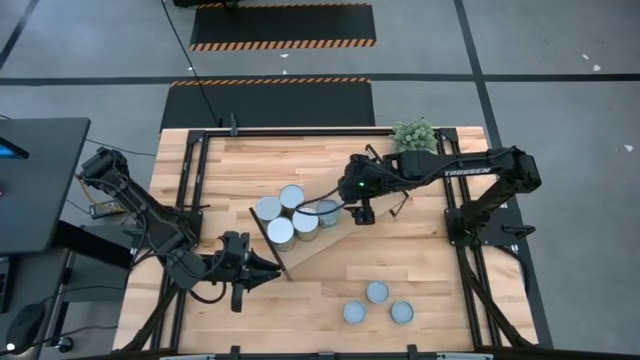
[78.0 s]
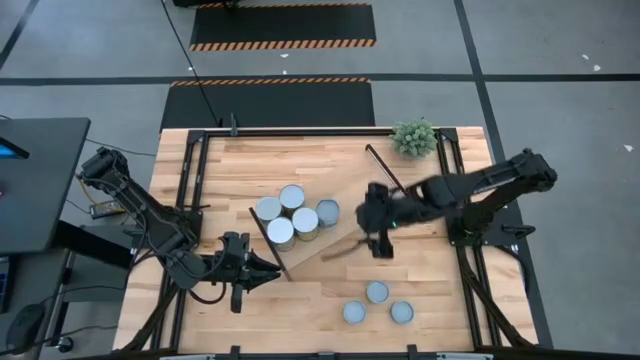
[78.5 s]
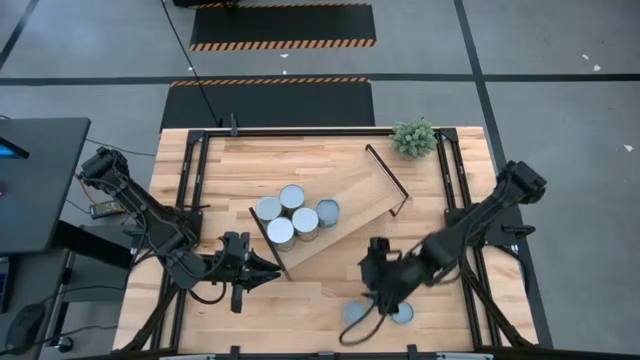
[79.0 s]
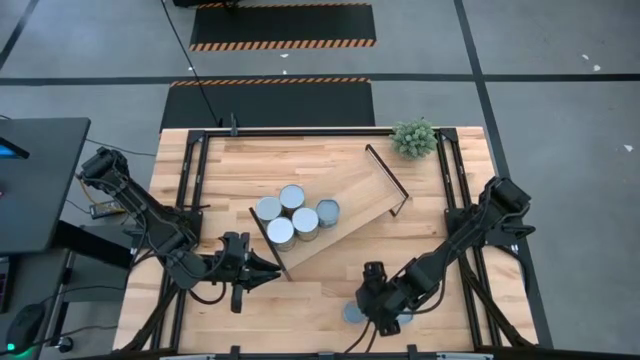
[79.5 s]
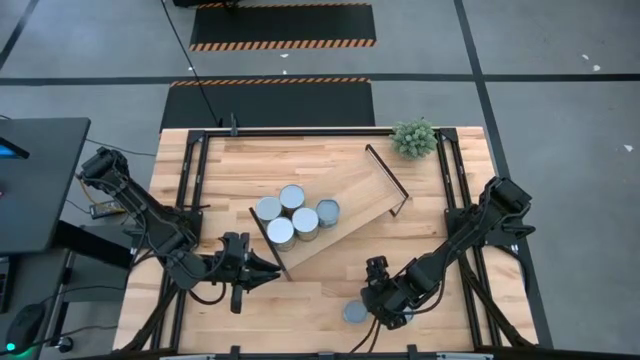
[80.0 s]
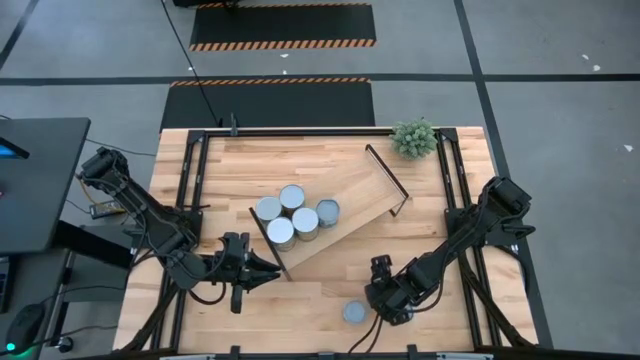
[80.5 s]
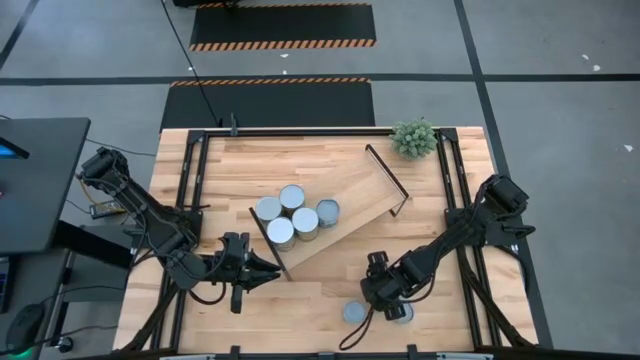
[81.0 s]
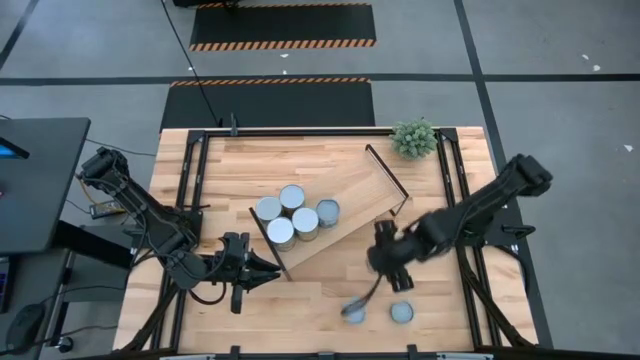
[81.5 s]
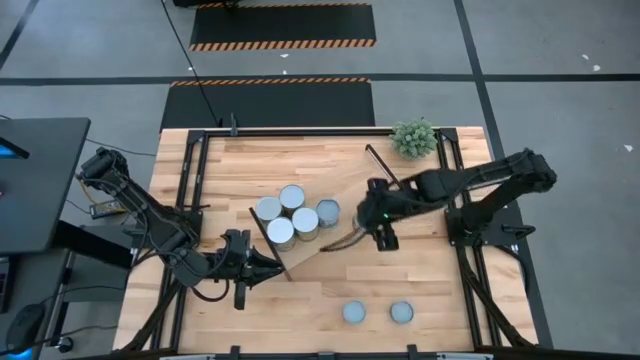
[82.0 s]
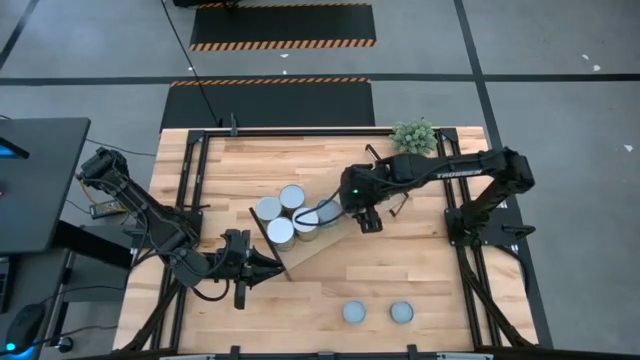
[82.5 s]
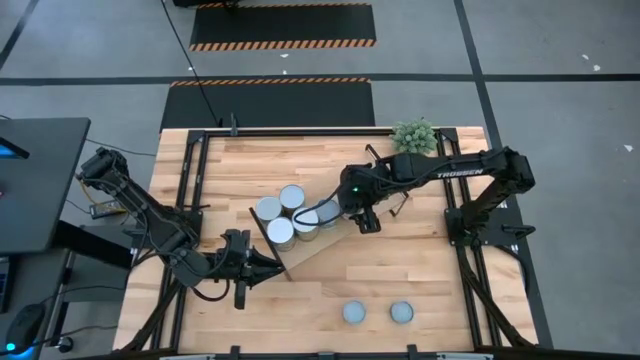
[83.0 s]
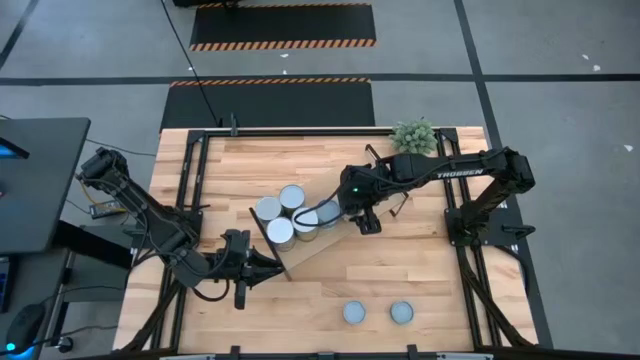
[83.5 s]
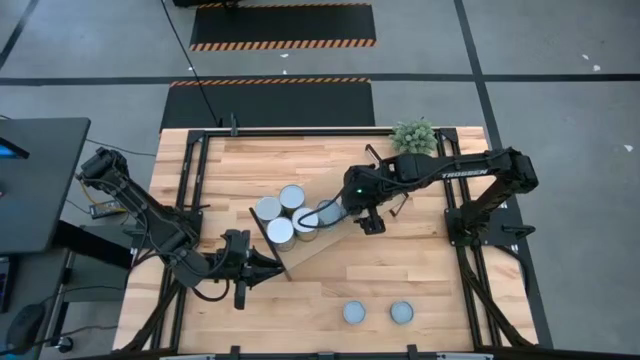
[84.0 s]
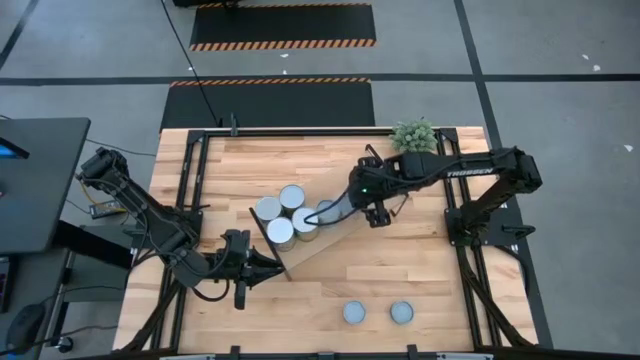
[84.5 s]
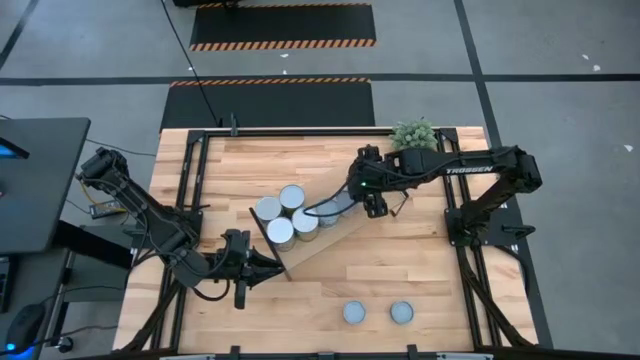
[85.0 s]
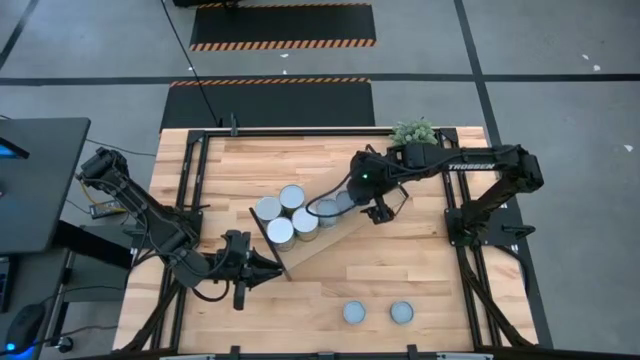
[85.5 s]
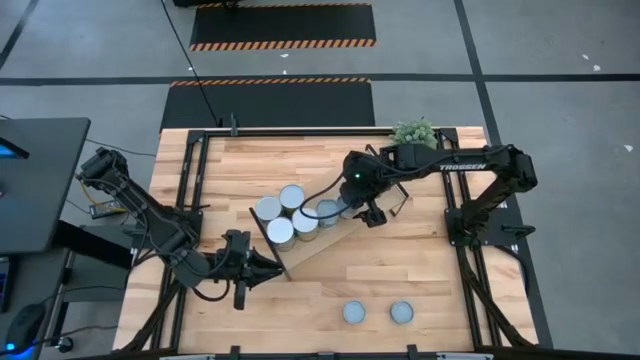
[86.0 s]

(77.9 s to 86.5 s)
Task: Pick and place cans onto a shelf
Put the canned green peas on the shelf

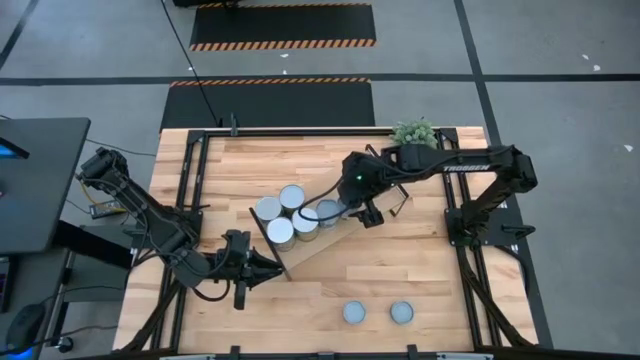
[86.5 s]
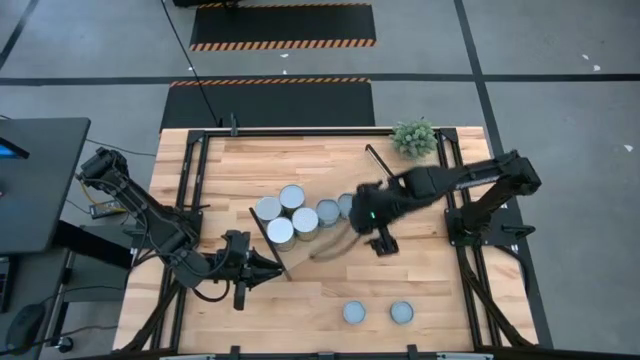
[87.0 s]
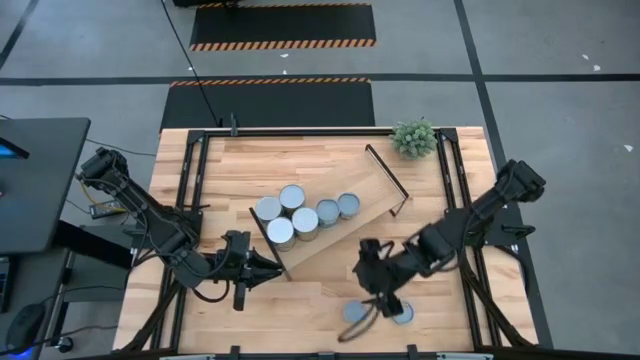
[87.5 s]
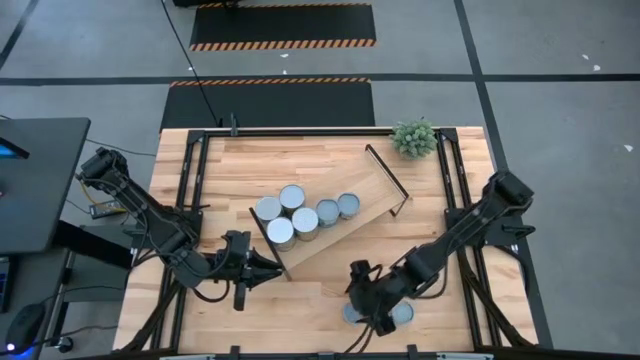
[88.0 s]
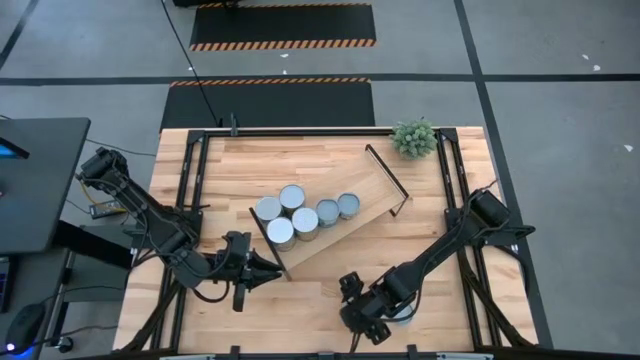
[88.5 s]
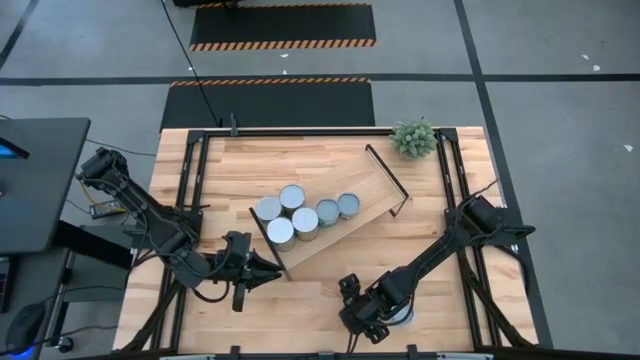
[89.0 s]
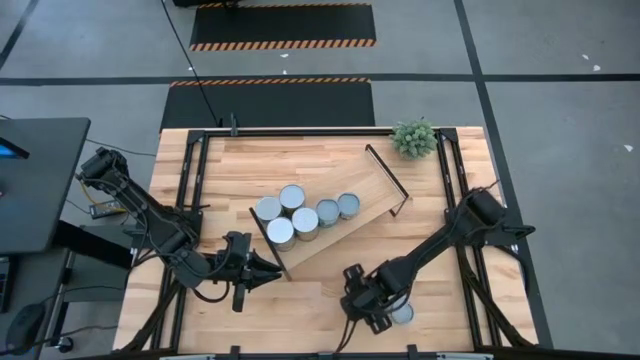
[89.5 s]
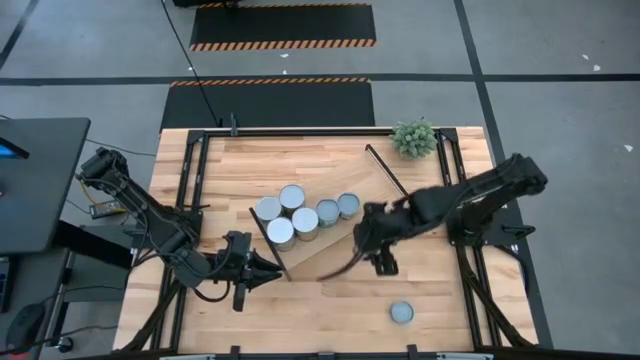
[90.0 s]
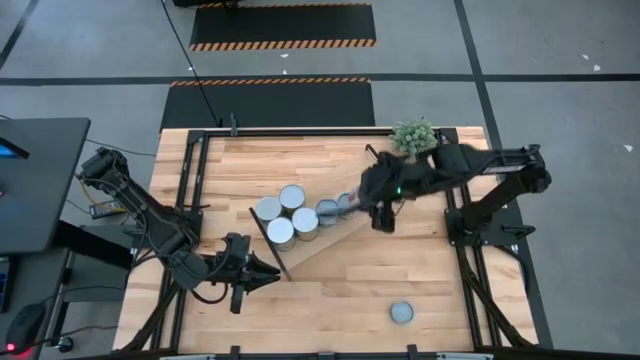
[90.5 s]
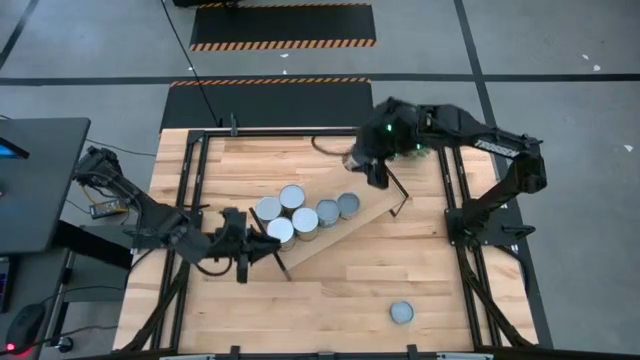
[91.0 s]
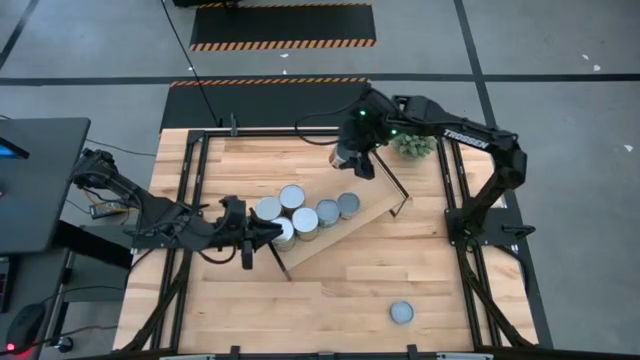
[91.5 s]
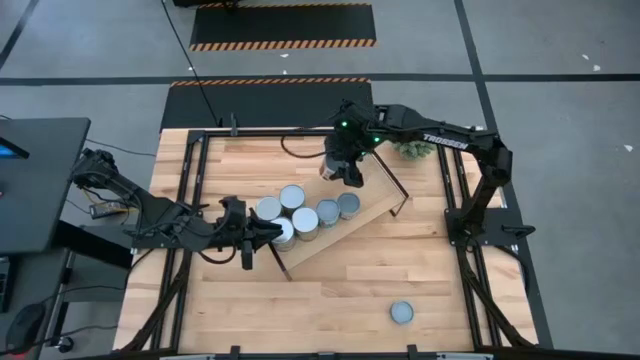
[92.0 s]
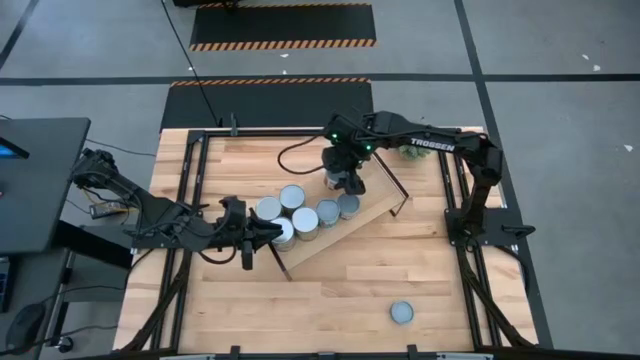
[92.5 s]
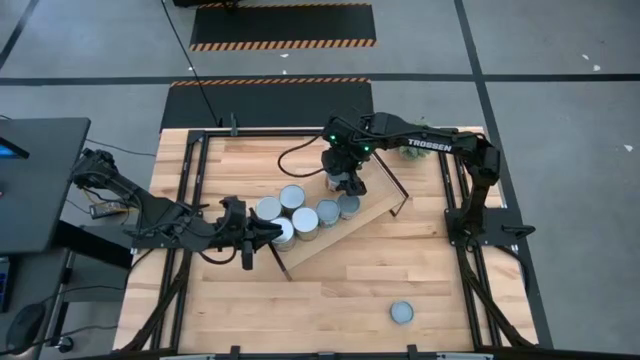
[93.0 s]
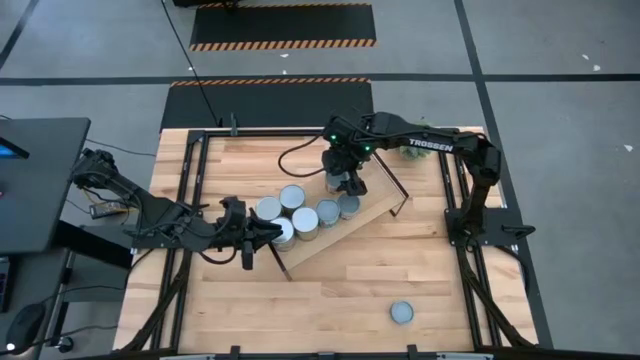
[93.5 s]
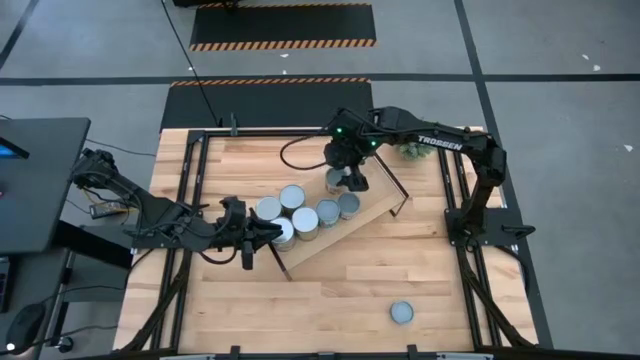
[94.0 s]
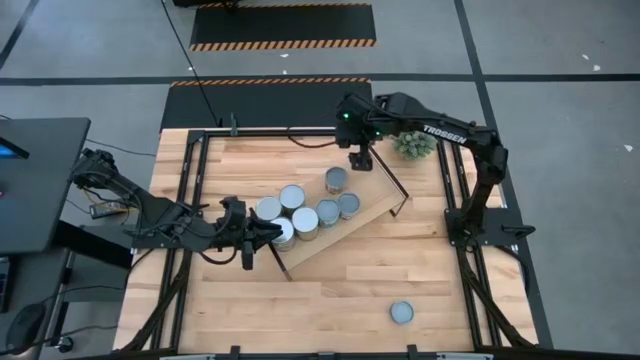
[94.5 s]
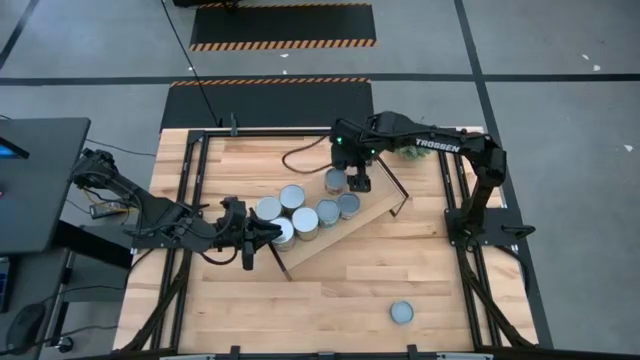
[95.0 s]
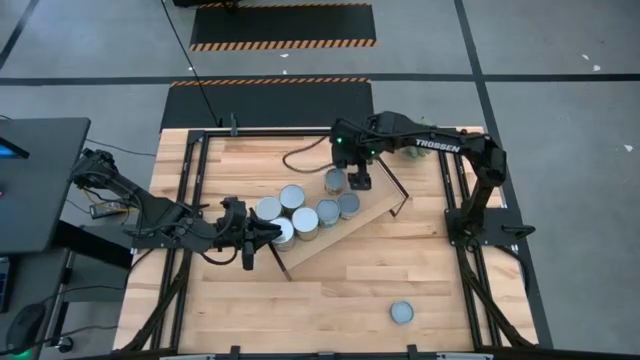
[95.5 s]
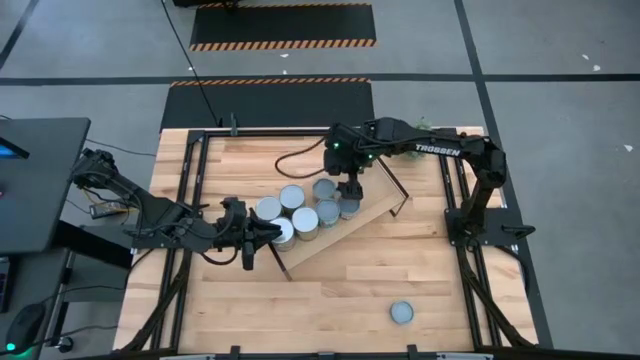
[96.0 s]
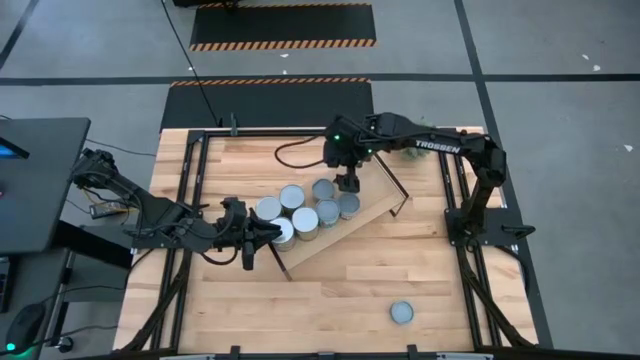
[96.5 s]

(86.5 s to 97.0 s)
Put the canned tomatoes on the shelf

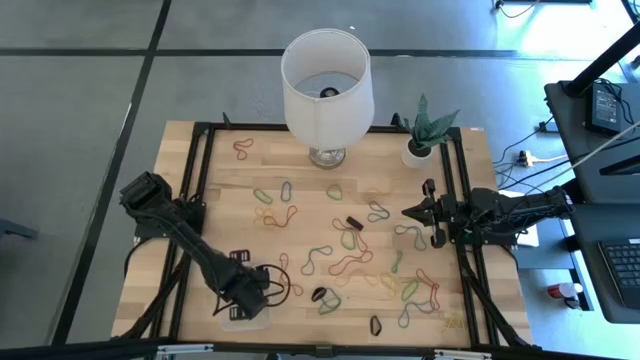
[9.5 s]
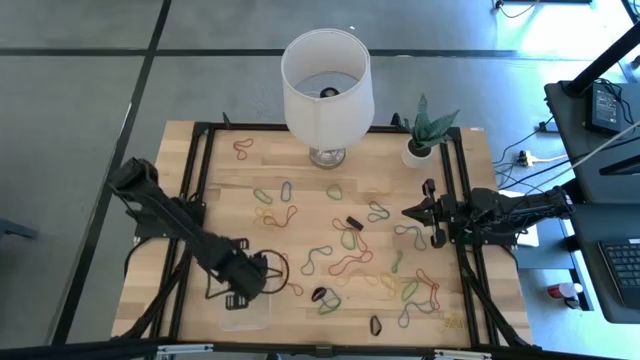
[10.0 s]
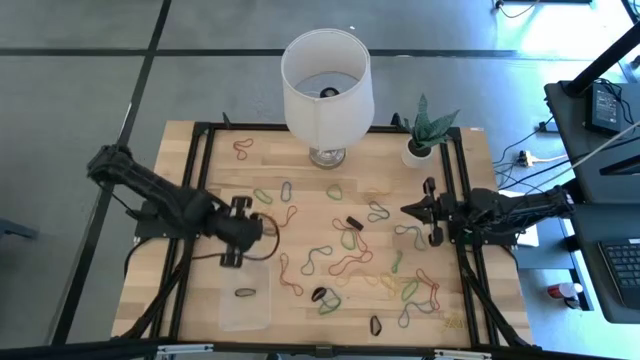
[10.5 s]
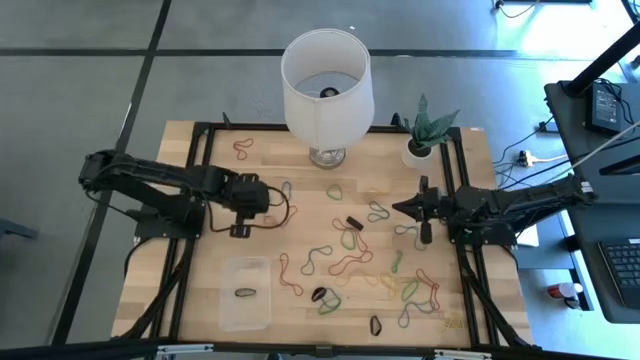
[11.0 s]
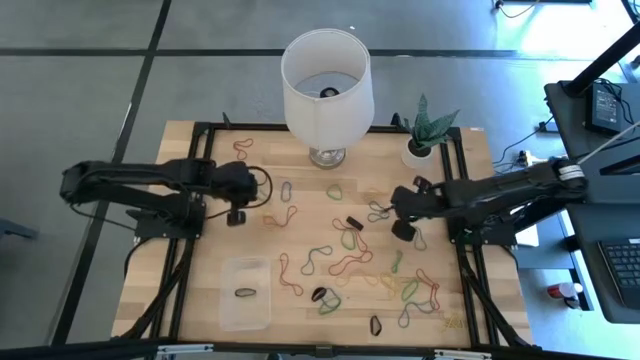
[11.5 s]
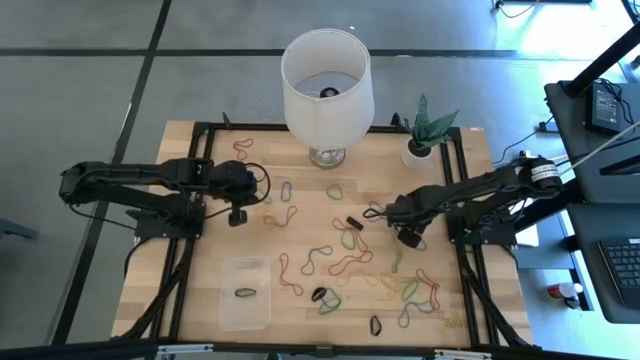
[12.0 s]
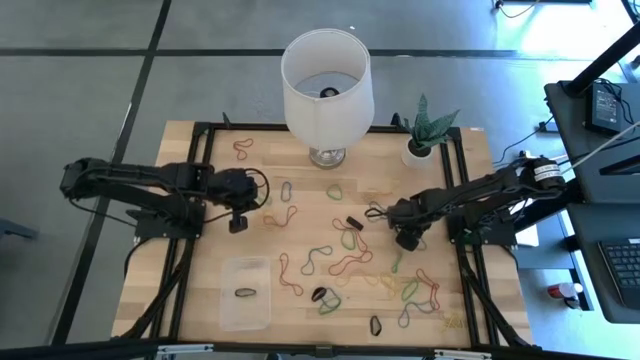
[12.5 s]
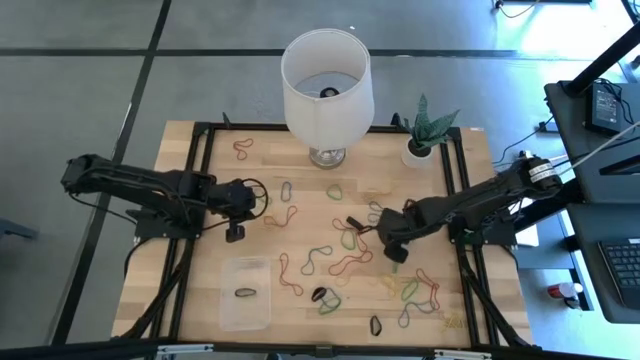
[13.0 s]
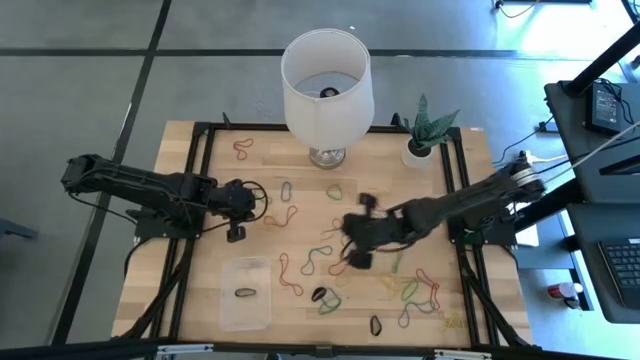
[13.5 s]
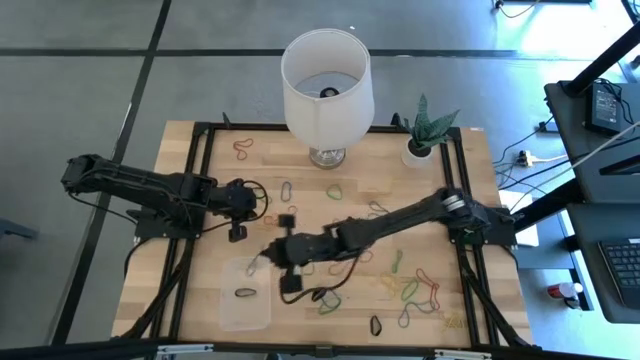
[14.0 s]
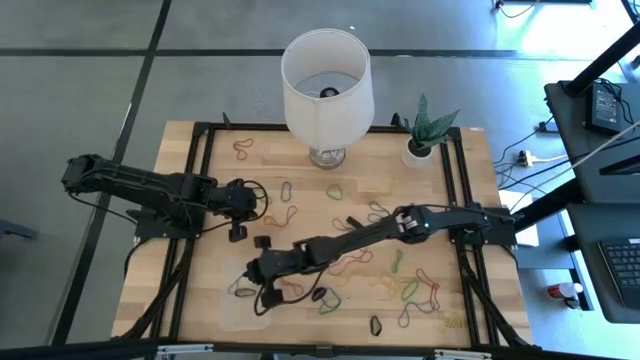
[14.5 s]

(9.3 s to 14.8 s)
Task: Pick and place rubber bands into bin
Put the blue rubber band into the transparent bin
